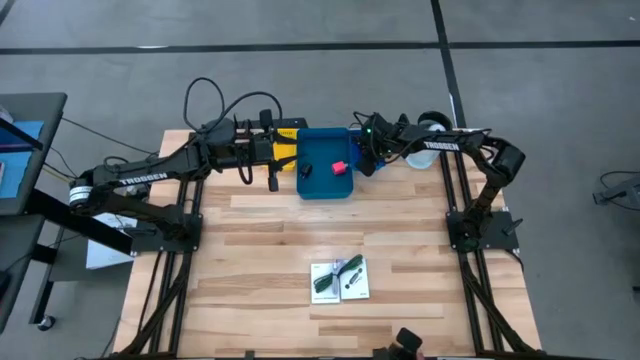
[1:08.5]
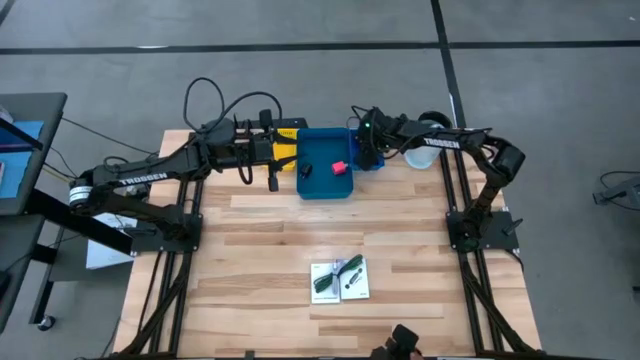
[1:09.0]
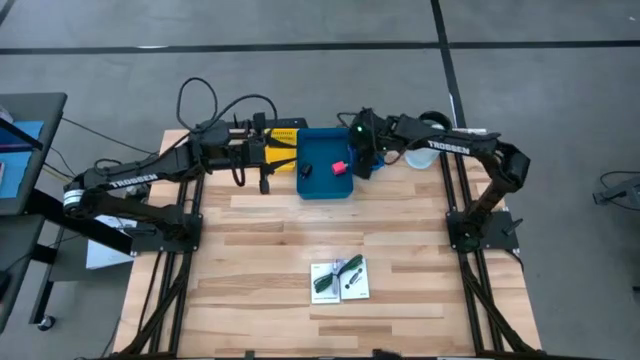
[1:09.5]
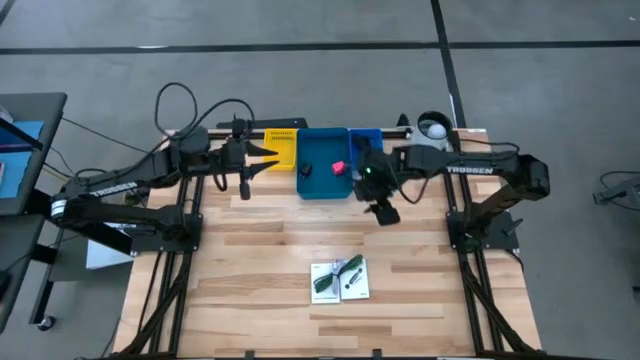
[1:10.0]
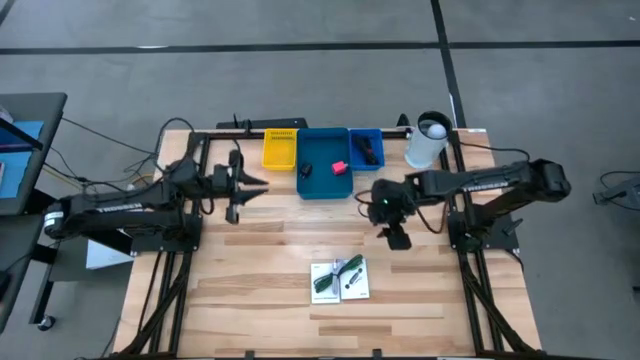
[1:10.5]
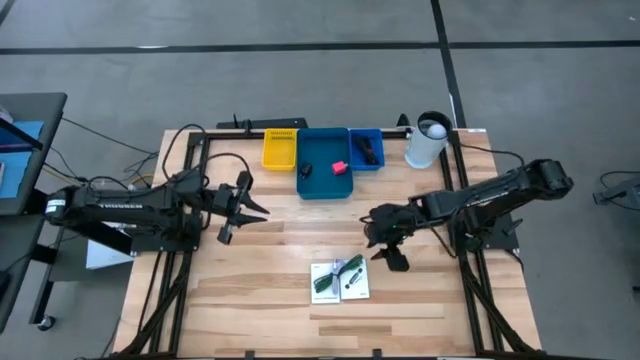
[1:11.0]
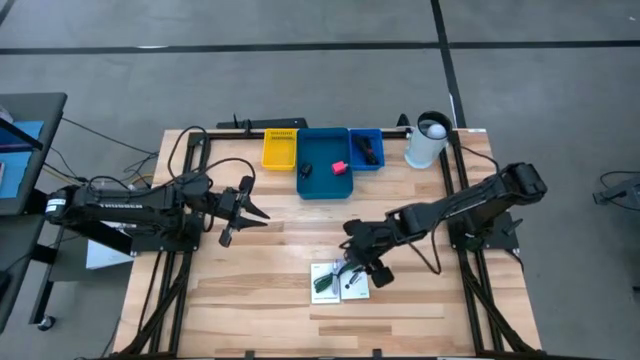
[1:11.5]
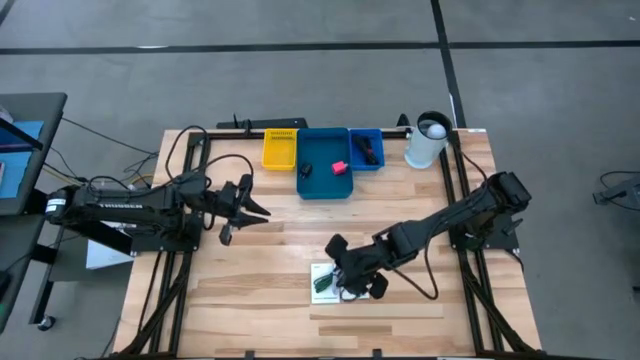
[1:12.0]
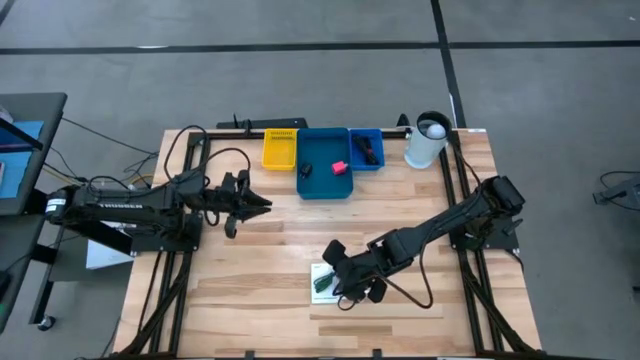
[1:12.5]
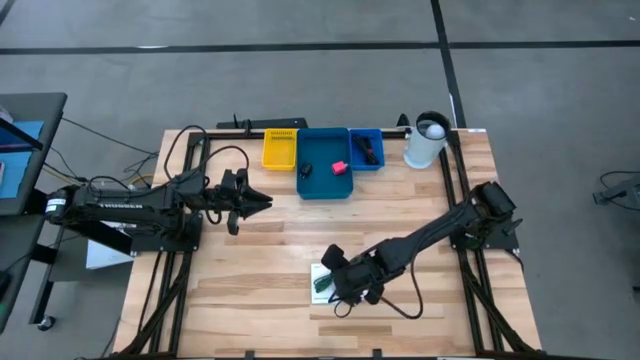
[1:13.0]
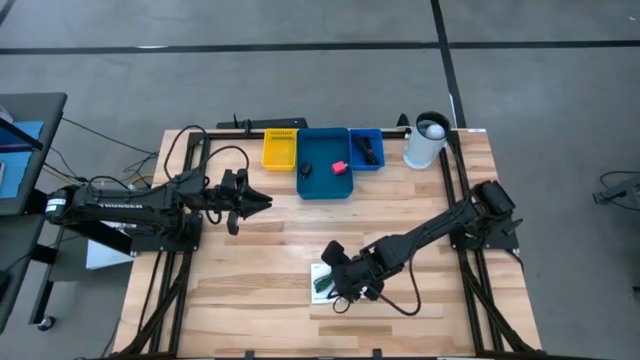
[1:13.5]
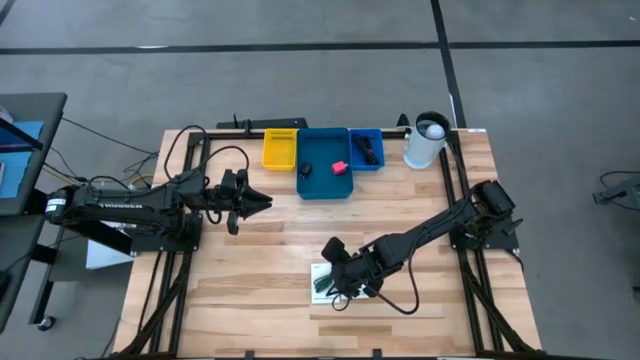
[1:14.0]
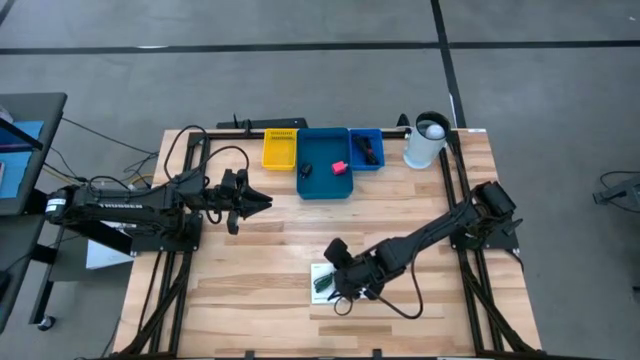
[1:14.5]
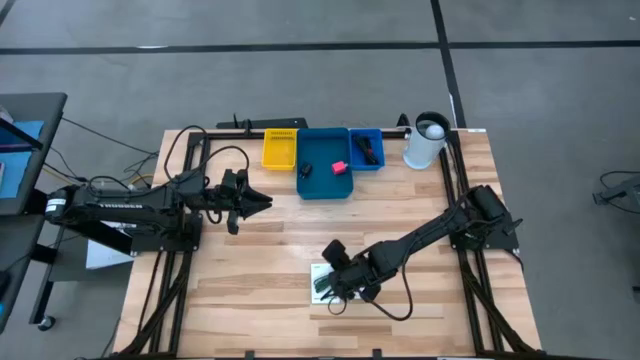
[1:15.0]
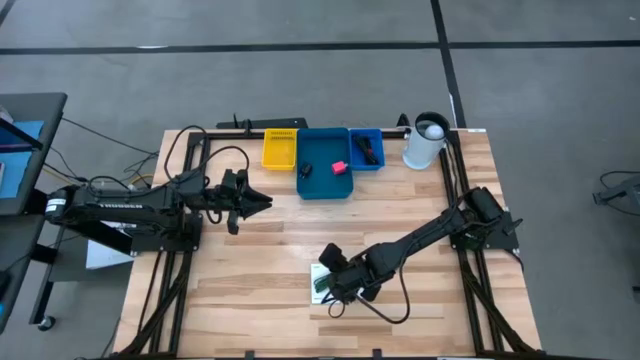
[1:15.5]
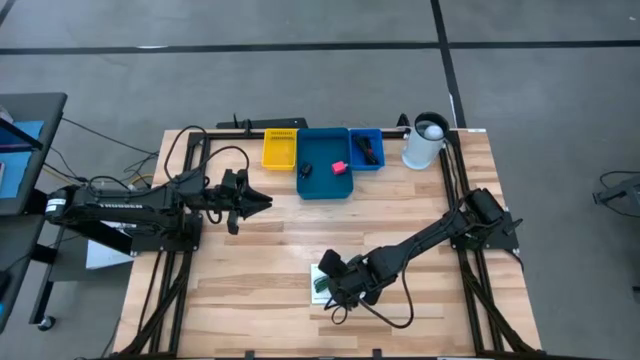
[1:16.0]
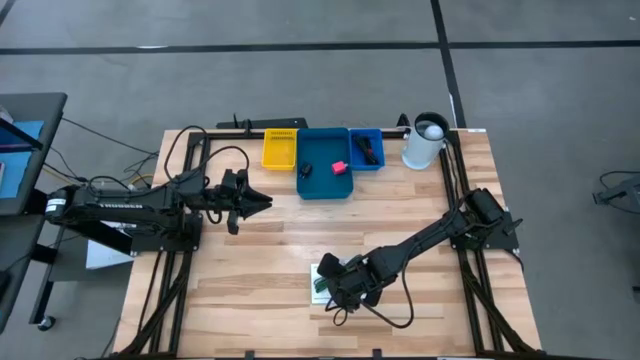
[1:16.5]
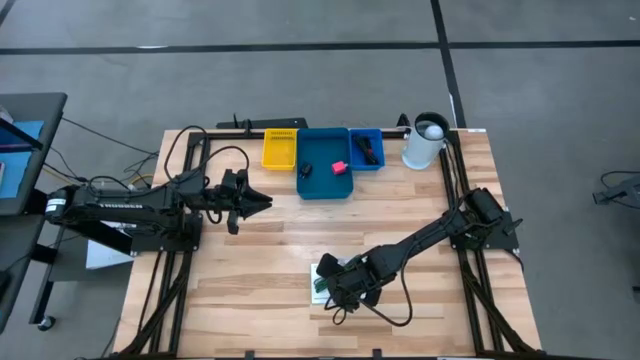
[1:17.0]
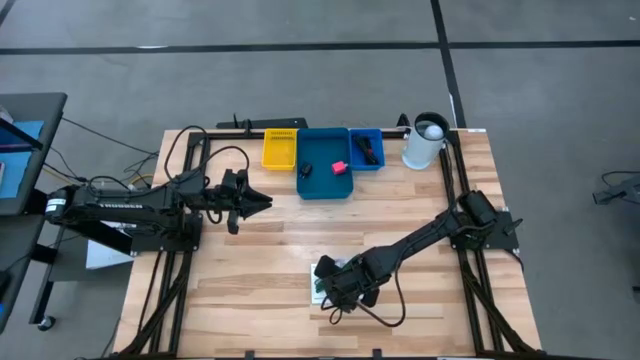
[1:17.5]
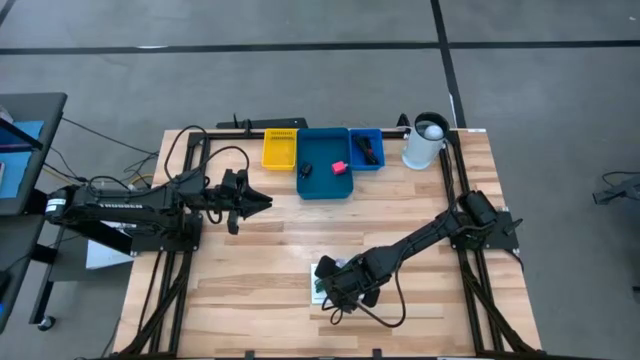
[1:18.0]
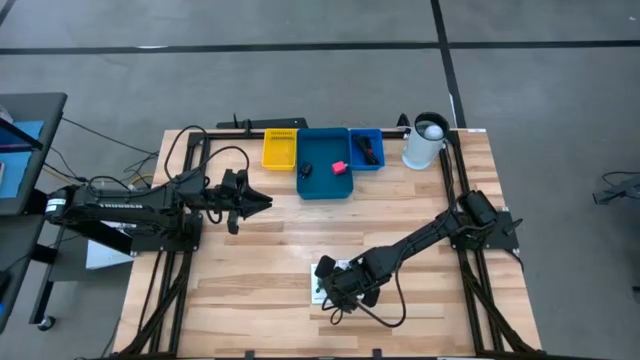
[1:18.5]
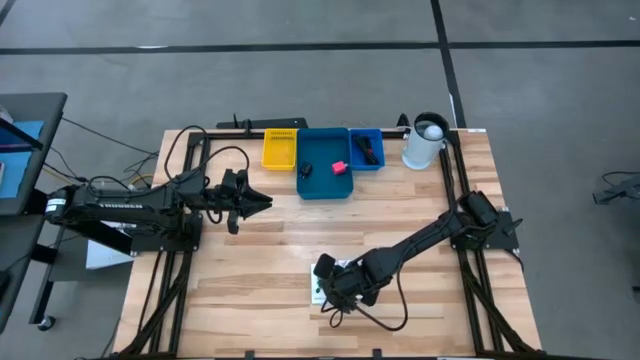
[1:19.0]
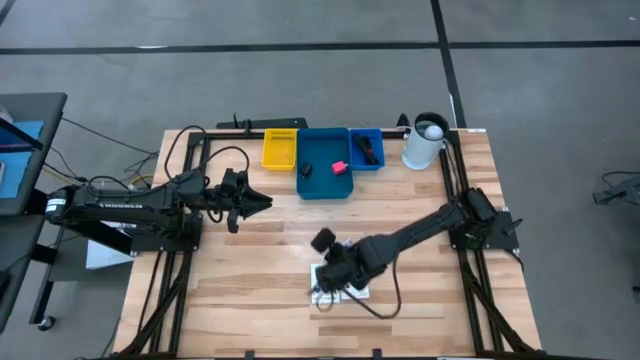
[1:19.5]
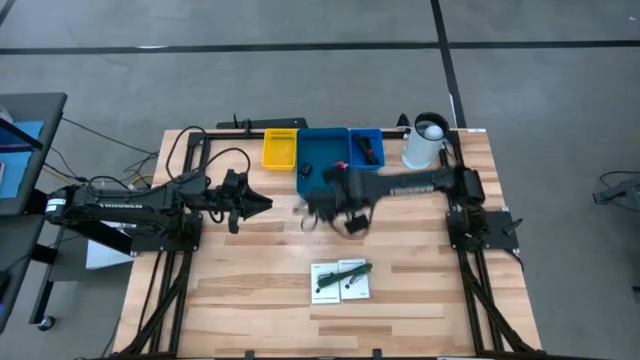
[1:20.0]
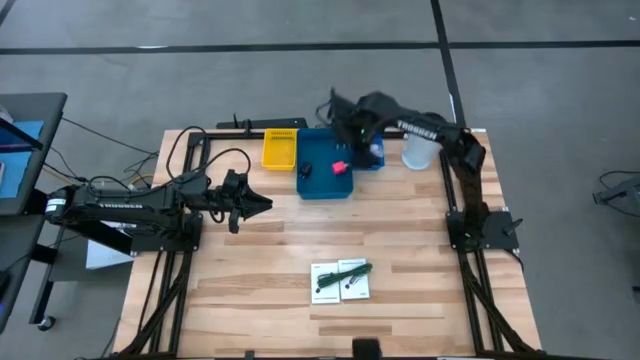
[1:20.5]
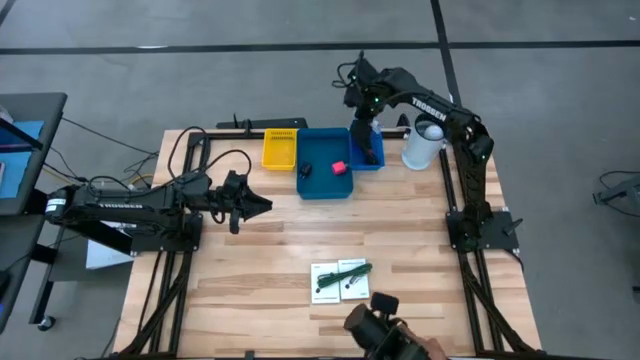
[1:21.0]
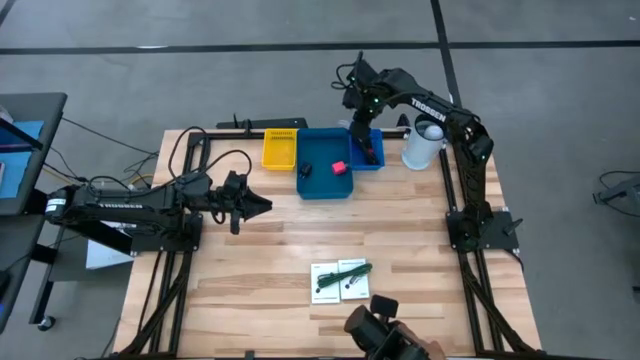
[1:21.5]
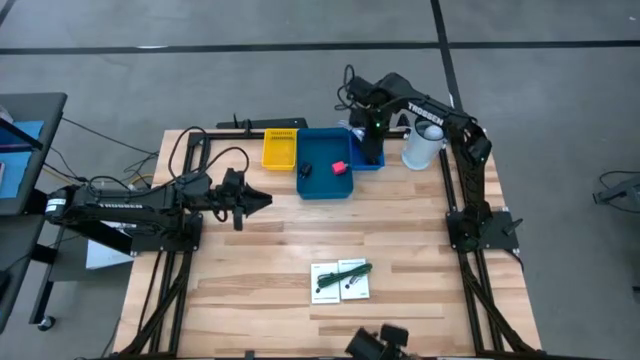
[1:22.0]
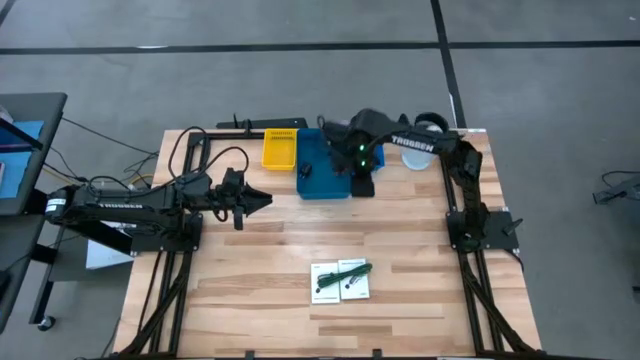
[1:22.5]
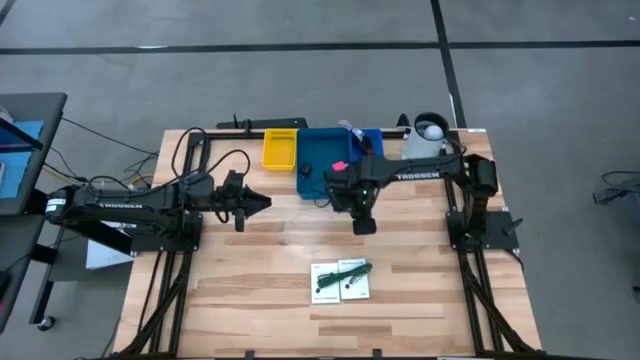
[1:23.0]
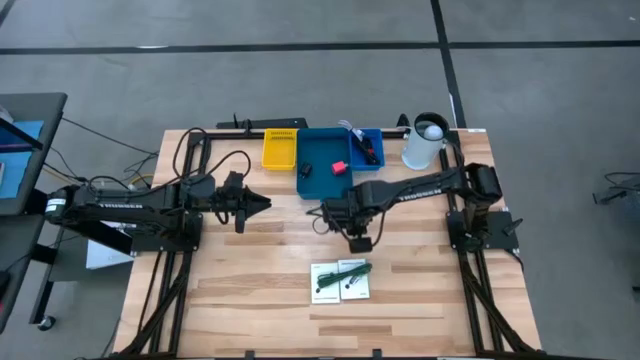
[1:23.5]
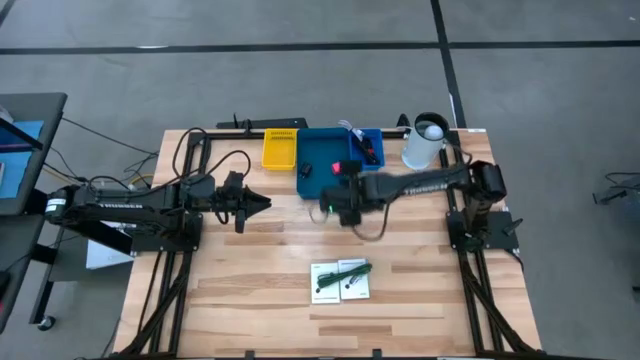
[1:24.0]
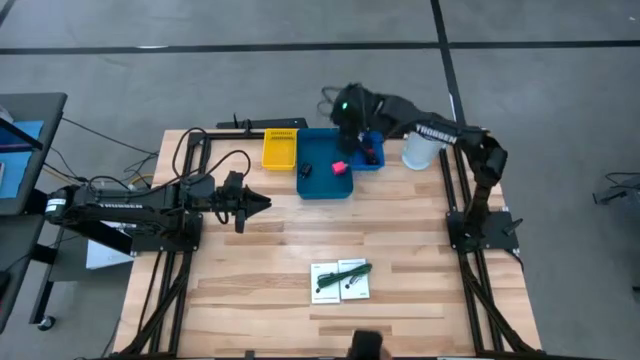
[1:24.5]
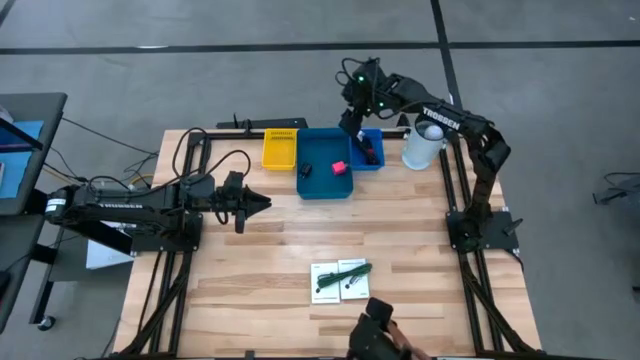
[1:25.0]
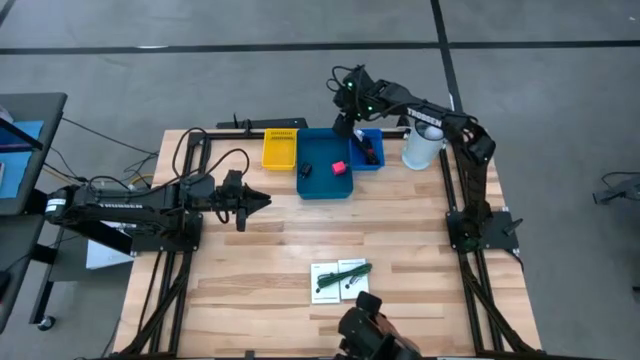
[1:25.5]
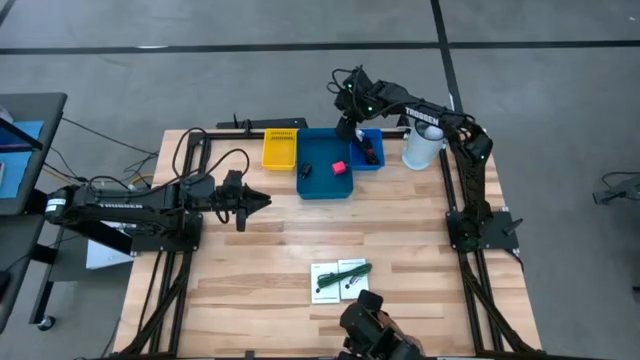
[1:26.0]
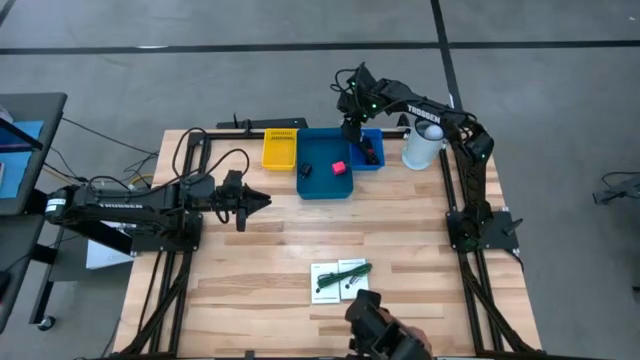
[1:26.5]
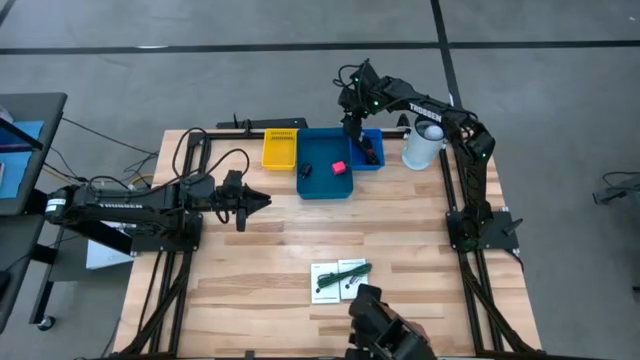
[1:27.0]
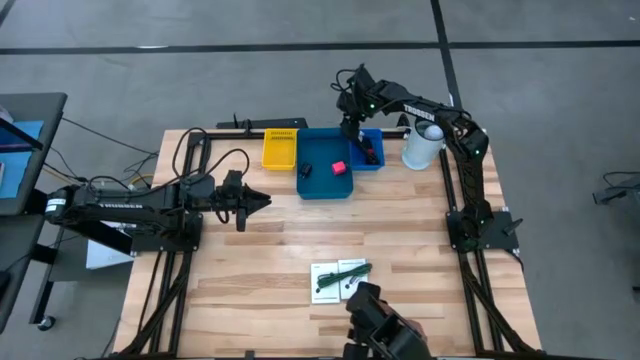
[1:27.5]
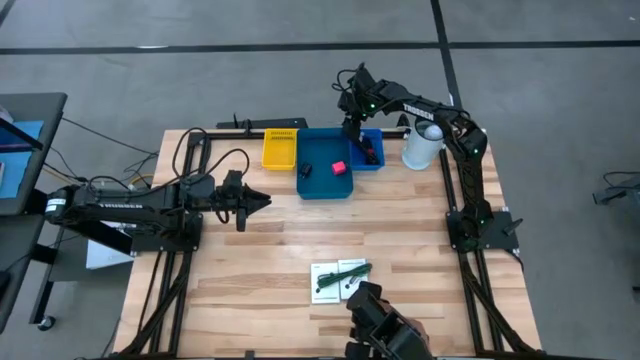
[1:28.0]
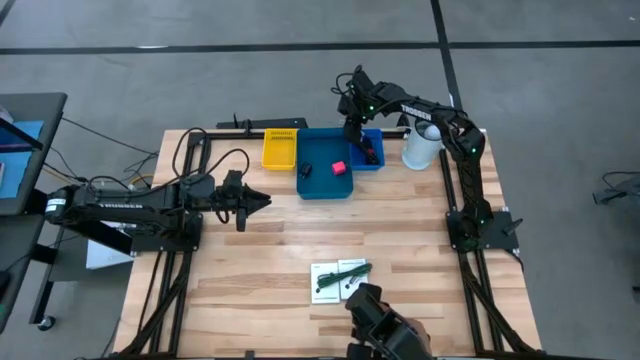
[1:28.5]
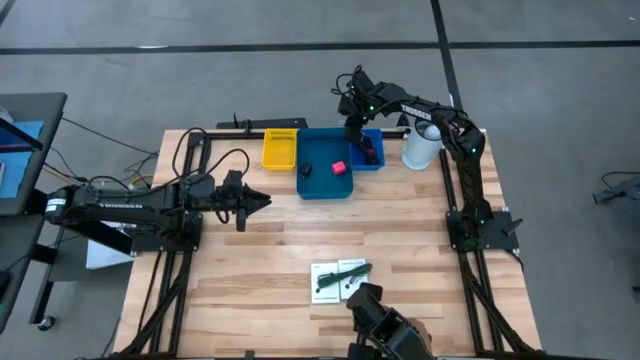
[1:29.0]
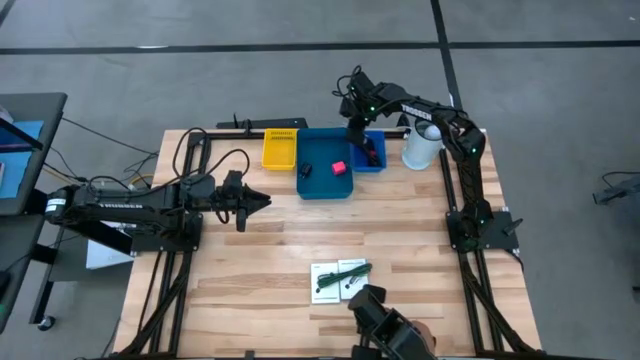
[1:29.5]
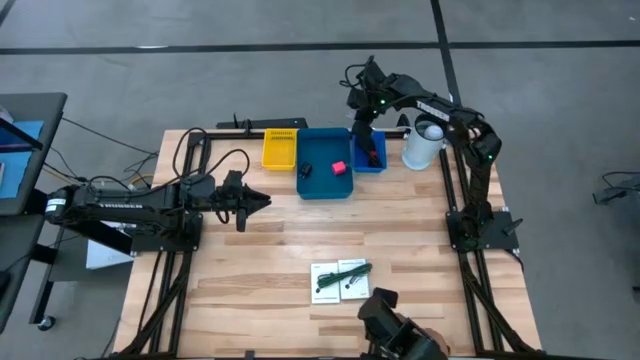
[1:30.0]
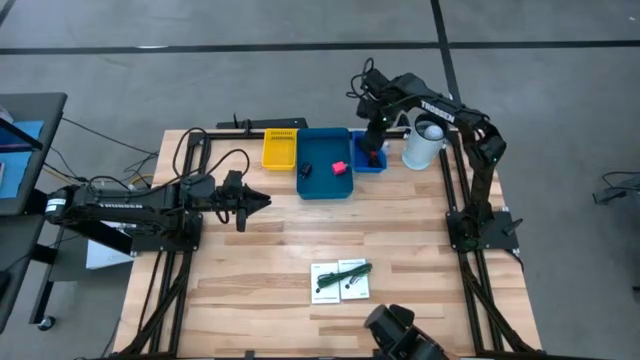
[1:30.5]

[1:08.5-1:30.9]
Task: Pick and place items into bin
Put the white charger cable into the blue basket
